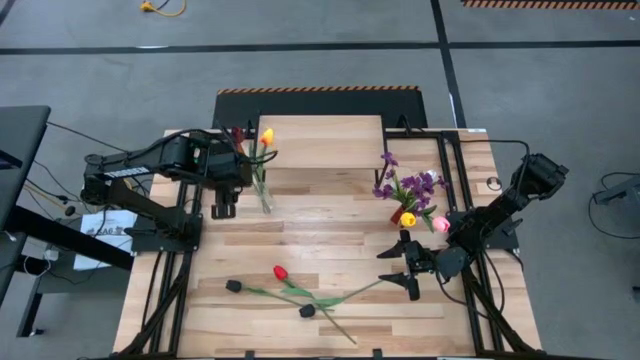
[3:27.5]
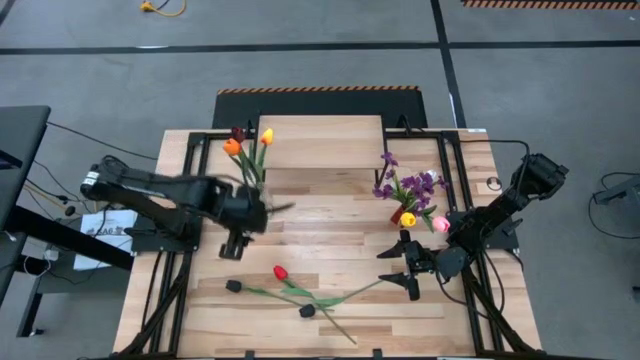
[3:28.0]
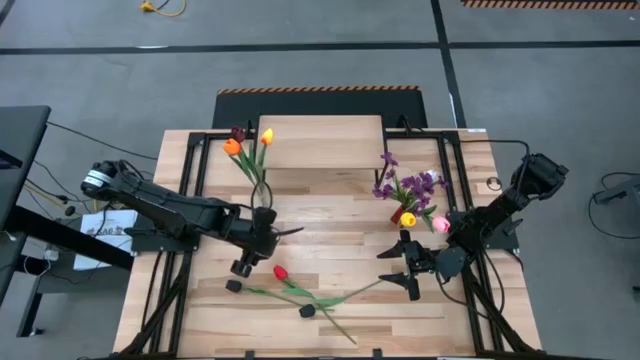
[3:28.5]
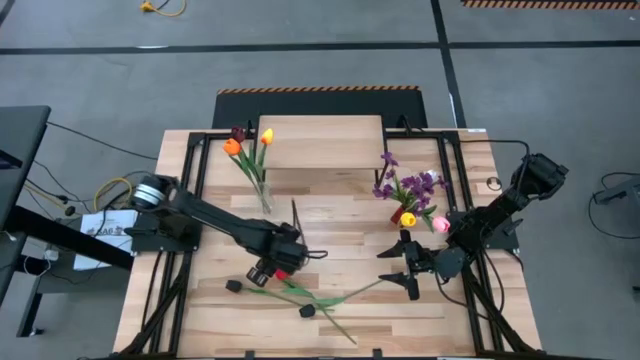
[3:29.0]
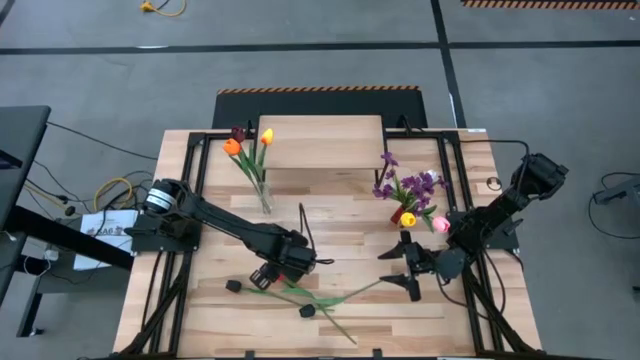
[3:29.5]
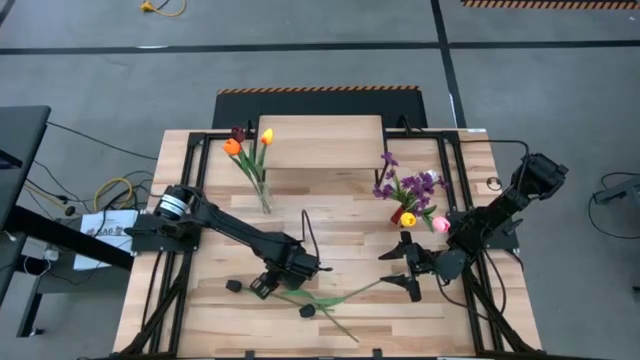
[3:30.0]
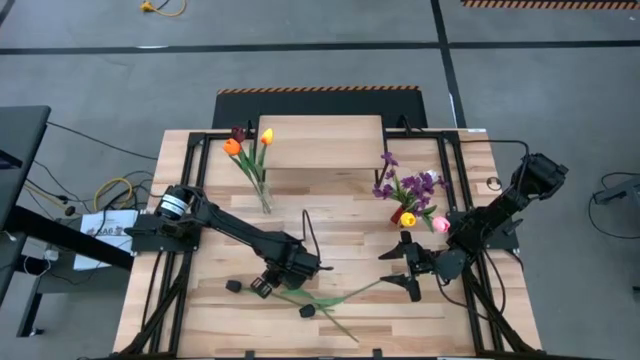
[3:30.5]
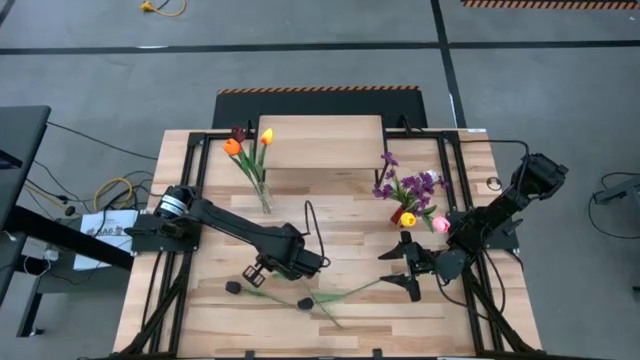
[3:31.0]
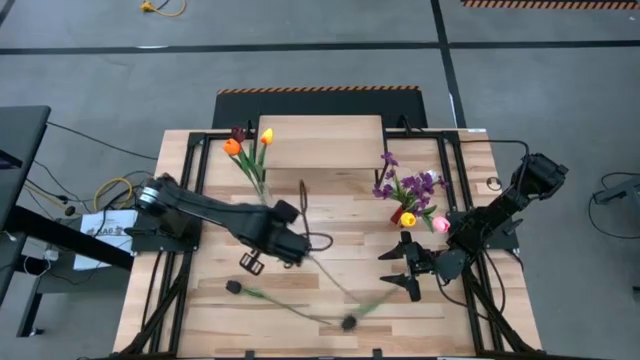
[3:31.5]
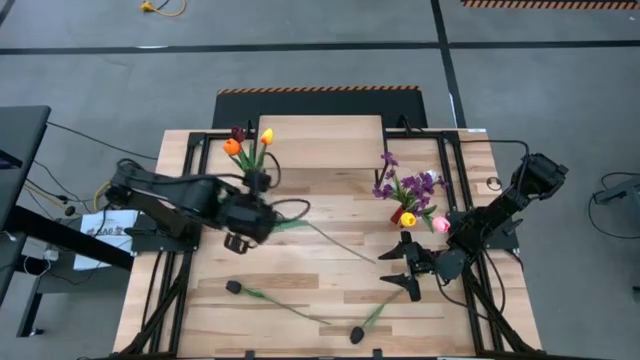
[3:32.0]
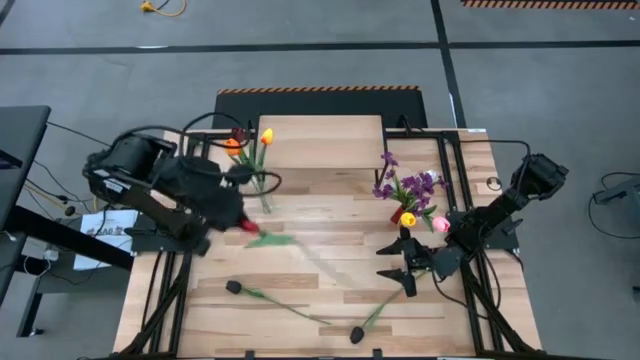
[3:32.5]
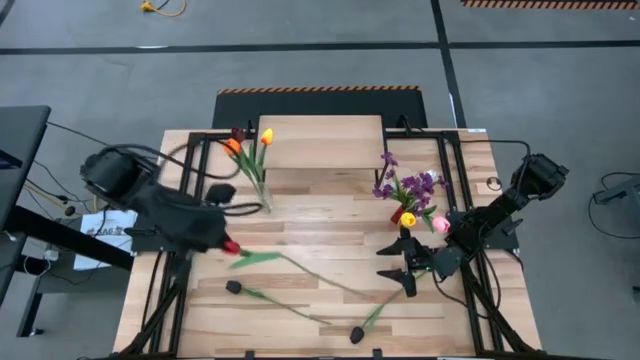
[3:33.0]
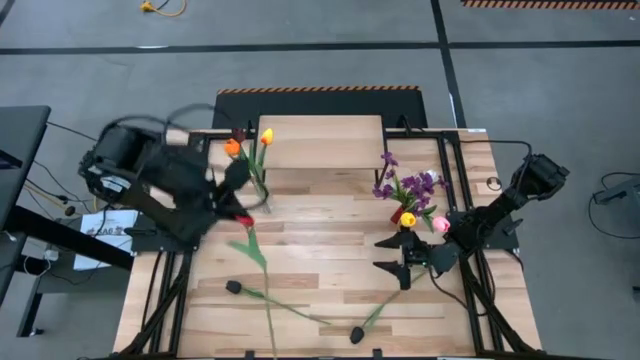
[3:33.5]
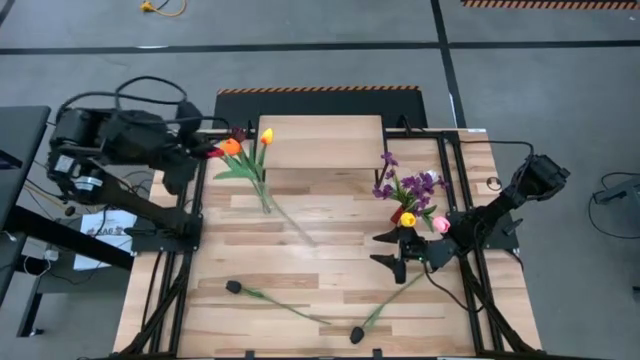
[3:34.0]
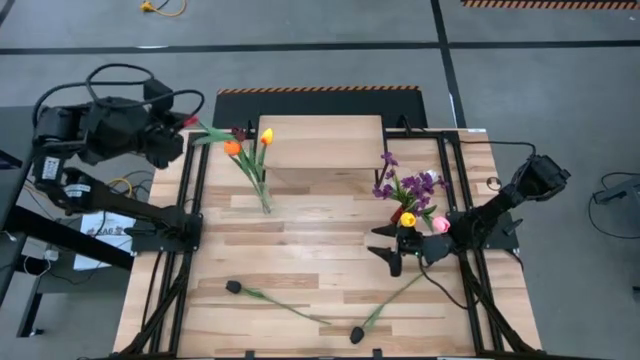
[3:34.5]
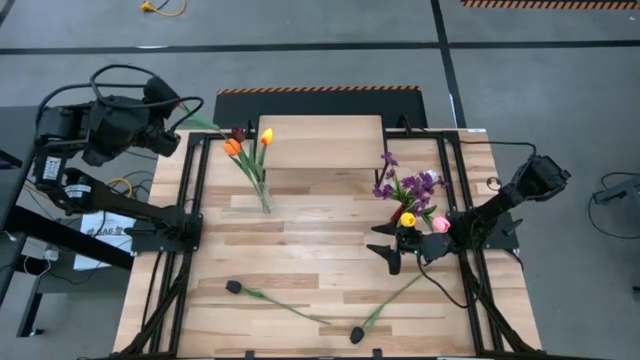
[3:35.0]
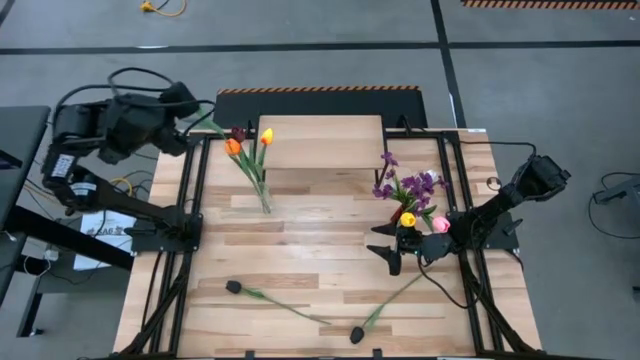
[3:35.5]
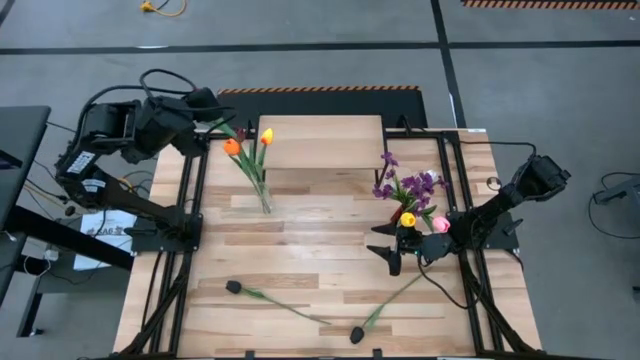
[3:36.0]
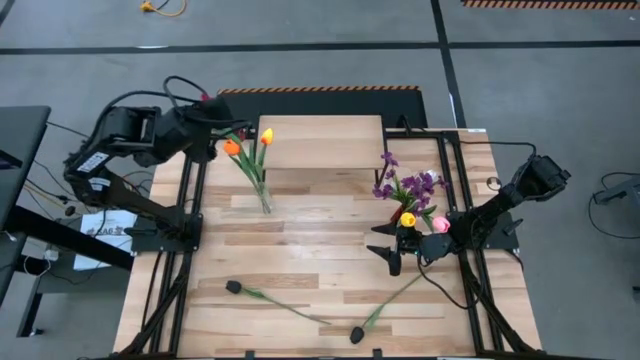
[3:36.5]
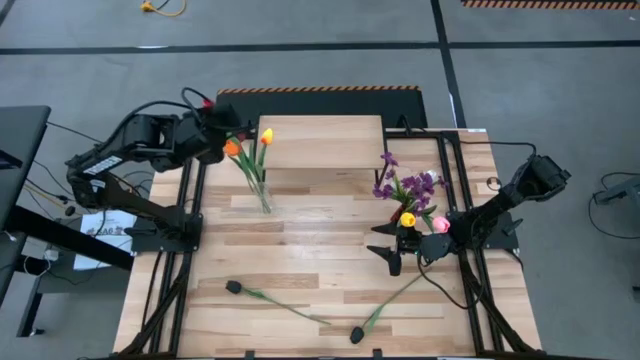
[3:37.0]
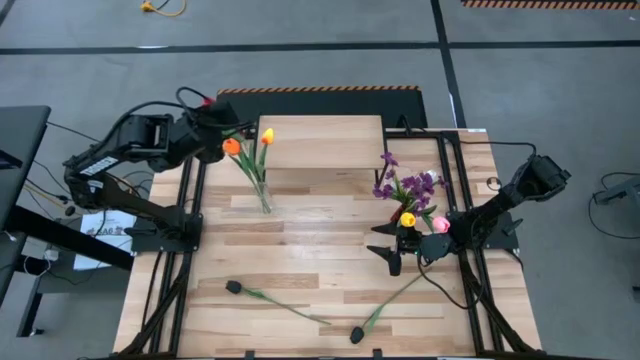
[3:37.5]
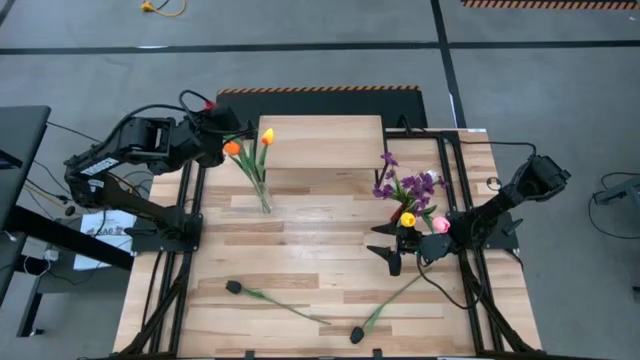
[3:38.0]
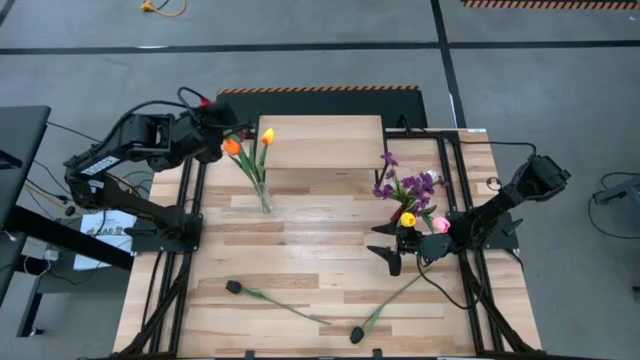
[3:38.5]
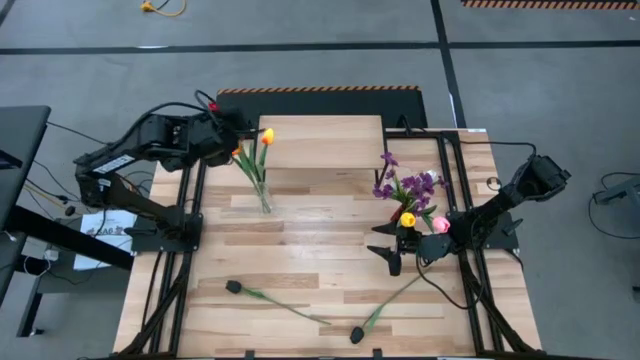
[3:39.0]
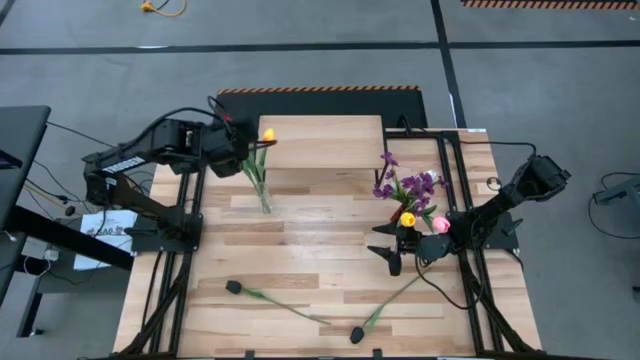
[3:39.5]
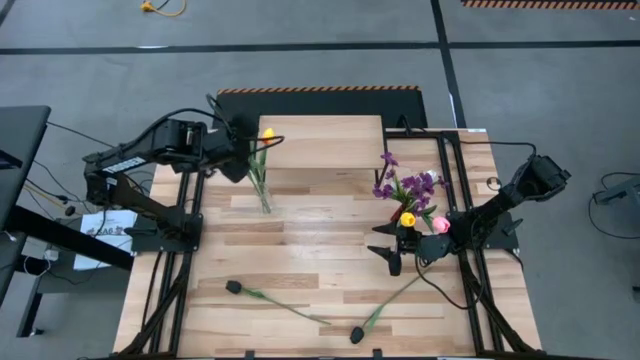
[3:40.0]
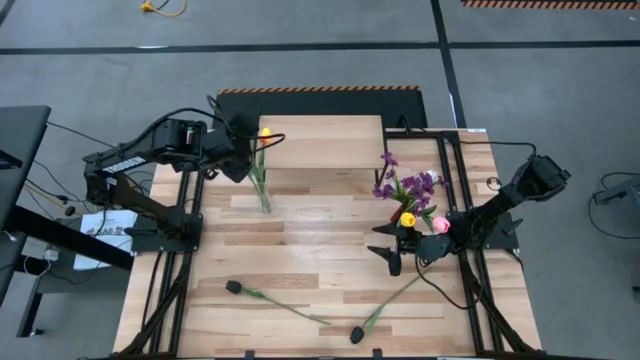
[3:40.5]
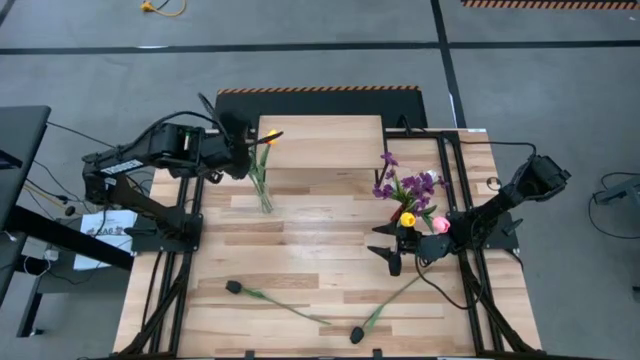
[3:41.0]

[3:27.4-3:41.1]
Task: Pick and place flowers into a vace then onto a shelf
Put the red flower into the transparent vase

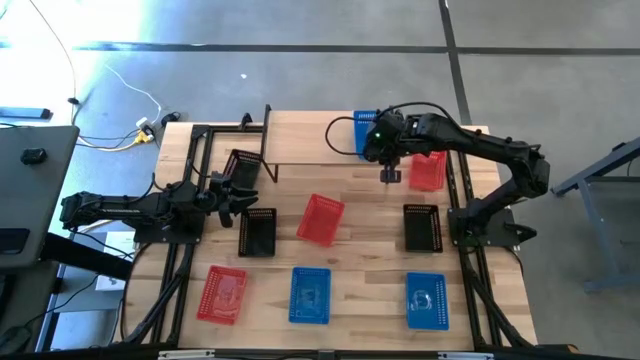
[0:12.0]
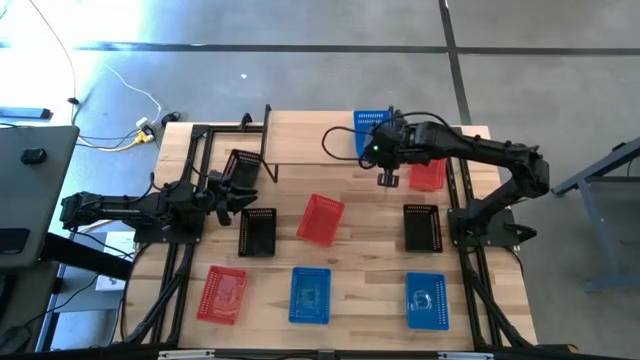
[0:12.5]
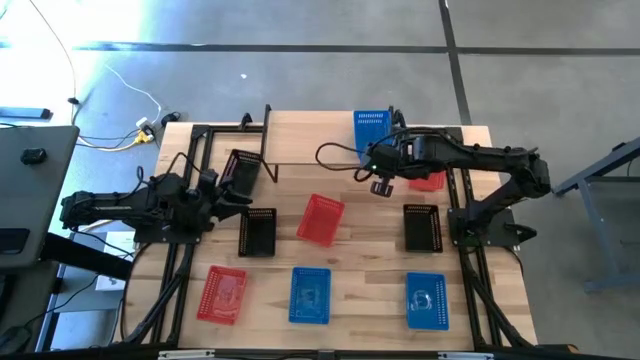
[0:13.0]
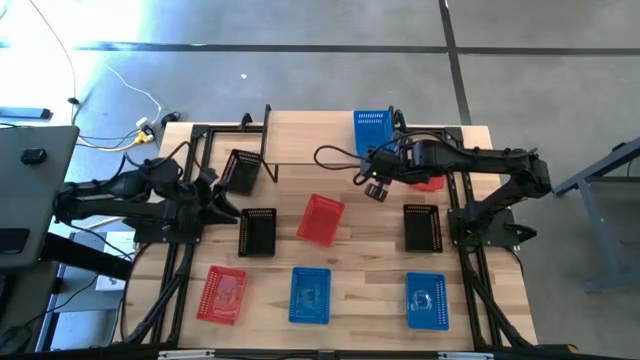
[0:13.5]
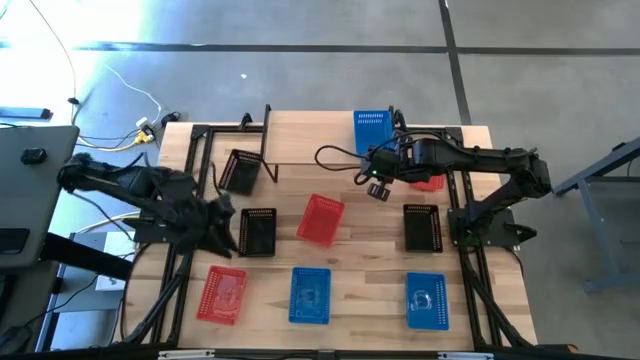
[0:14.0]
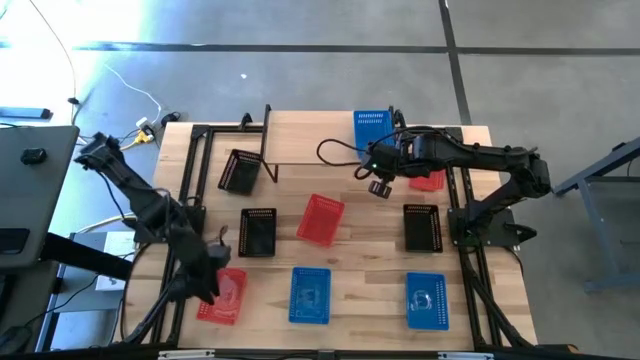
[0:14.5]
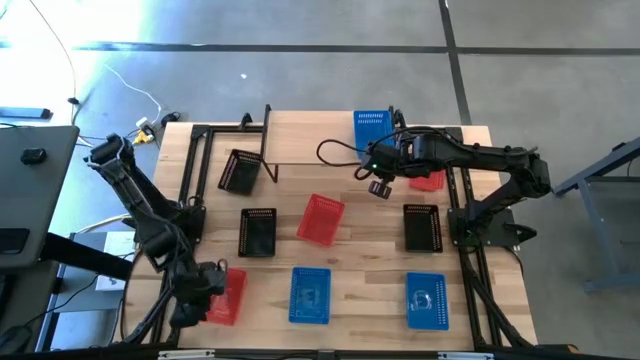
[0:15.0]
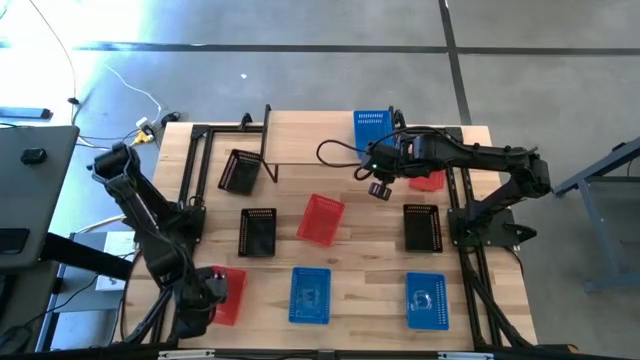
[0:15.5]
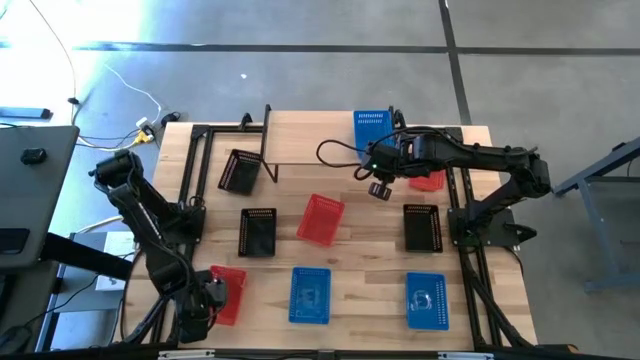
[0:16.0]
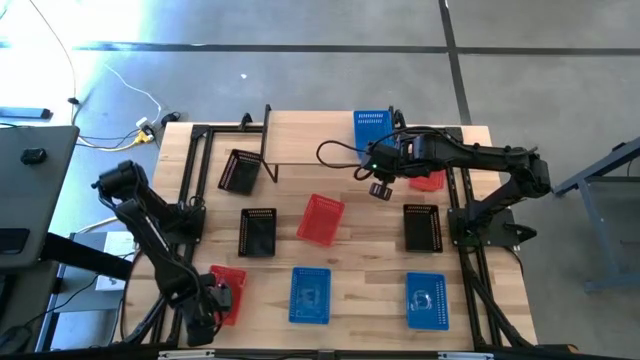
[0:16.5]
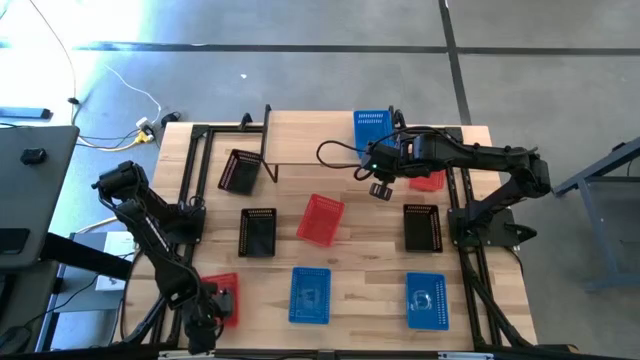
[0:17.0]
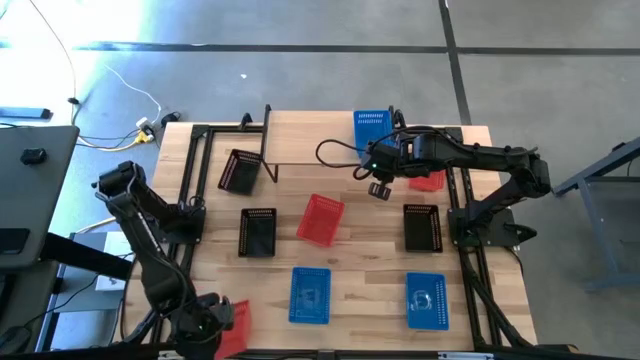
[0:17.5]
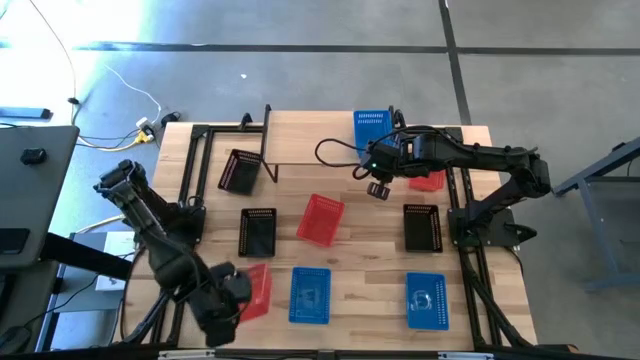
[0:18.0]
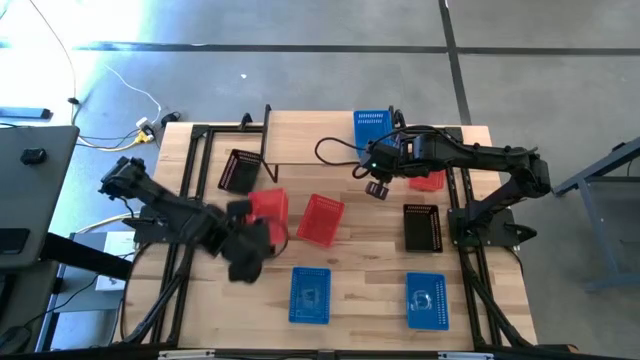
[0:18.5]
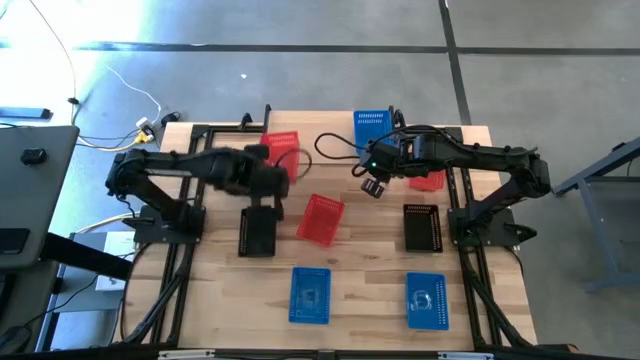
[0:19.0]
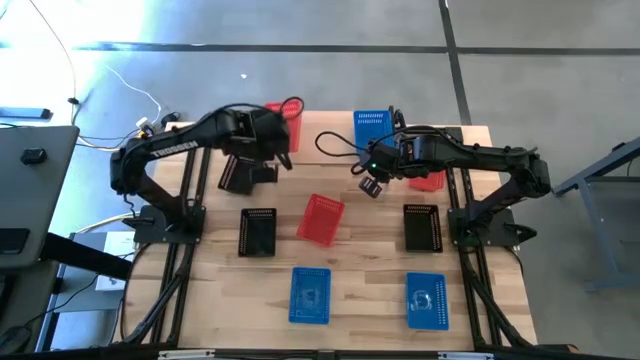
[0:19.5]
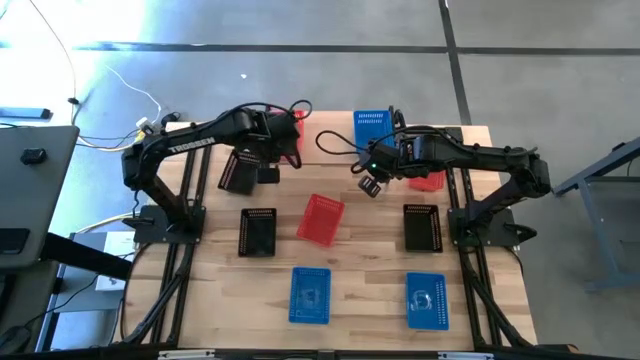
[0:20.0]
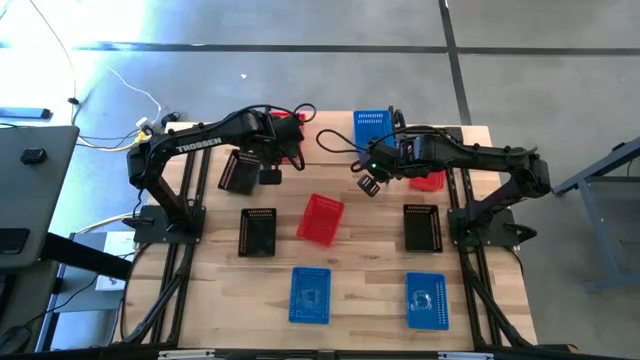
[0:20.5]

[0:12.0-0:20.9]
Task: Stack baskets on shelf by color
Put the bottom red bin on the shelf
